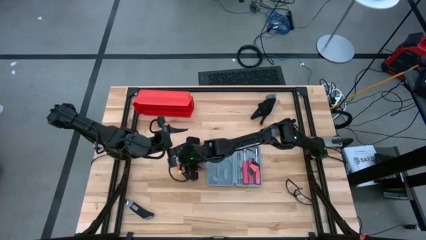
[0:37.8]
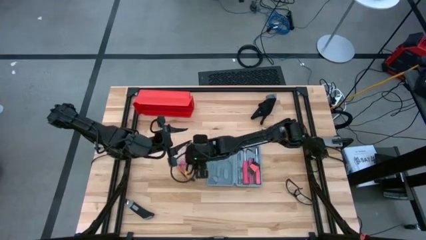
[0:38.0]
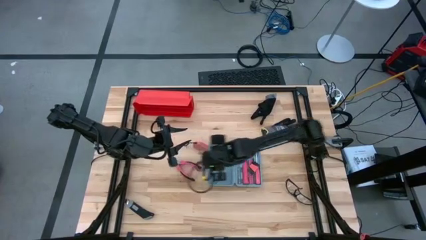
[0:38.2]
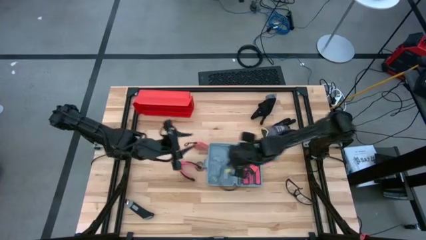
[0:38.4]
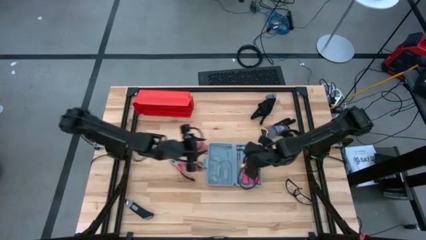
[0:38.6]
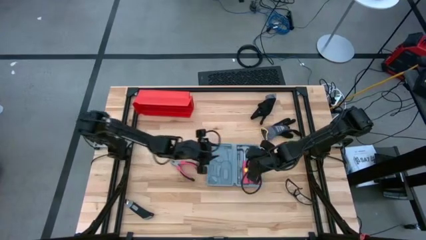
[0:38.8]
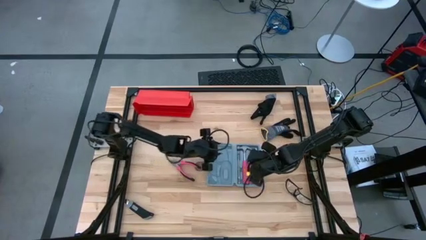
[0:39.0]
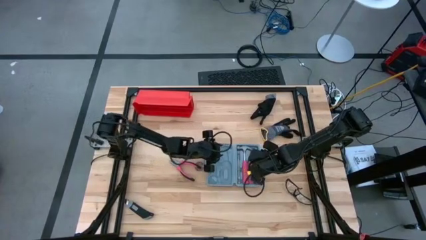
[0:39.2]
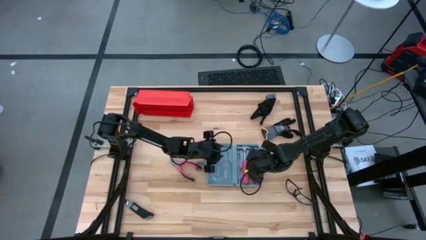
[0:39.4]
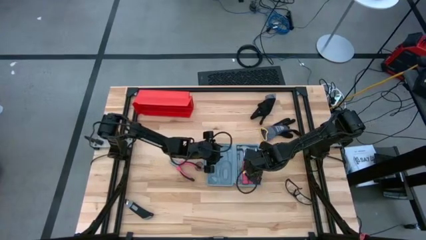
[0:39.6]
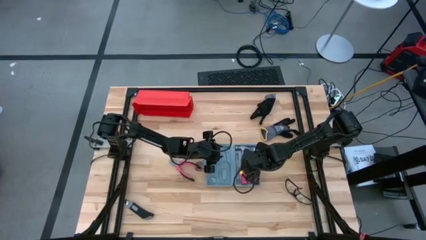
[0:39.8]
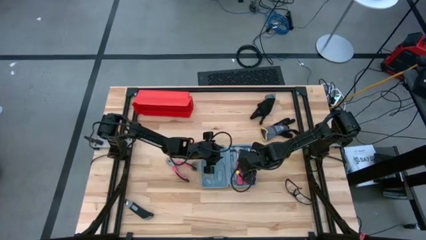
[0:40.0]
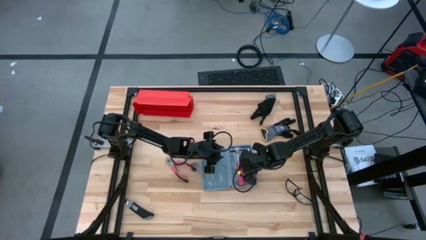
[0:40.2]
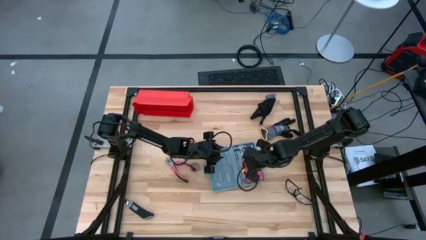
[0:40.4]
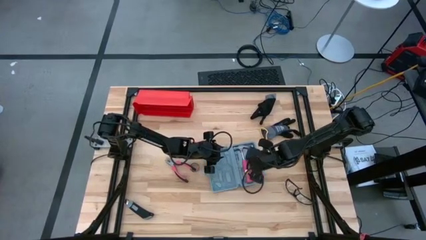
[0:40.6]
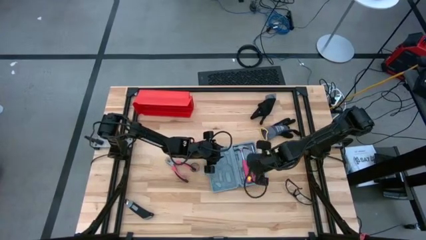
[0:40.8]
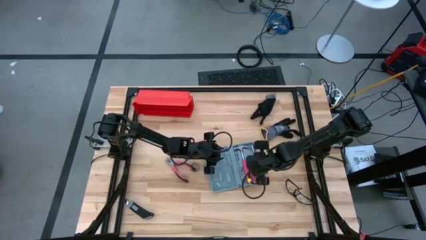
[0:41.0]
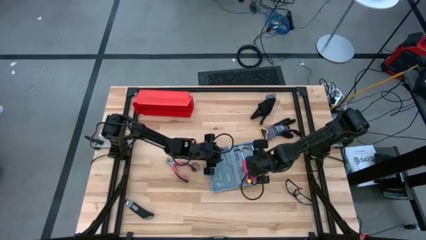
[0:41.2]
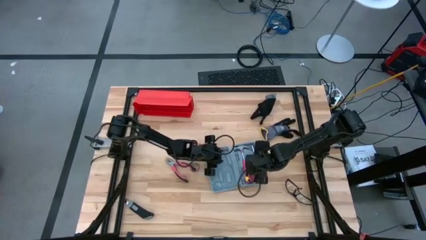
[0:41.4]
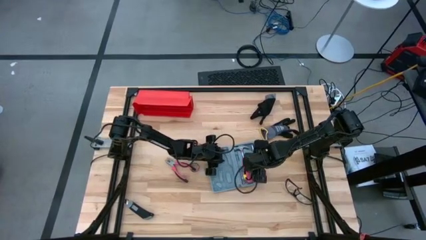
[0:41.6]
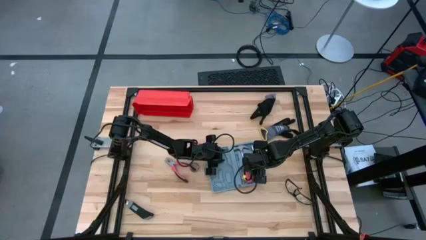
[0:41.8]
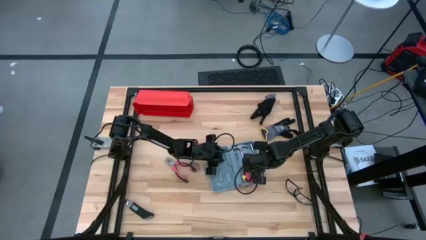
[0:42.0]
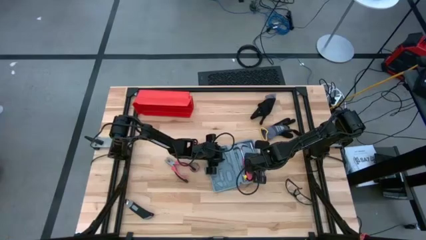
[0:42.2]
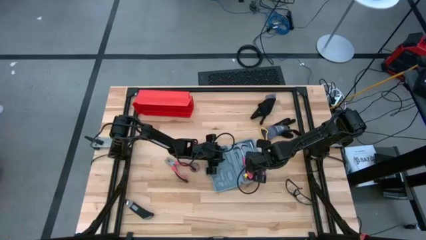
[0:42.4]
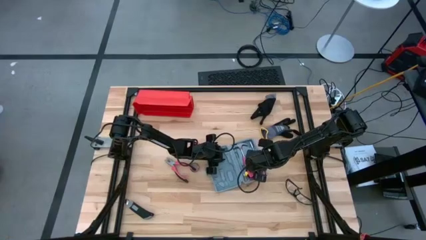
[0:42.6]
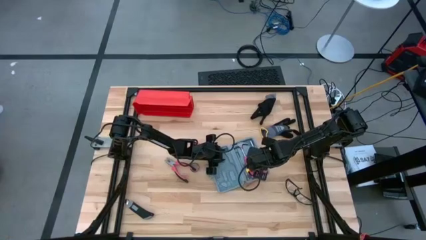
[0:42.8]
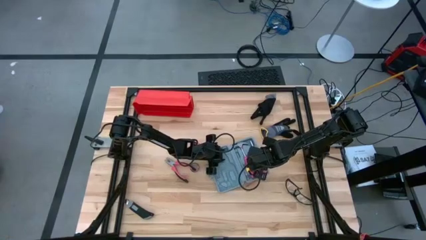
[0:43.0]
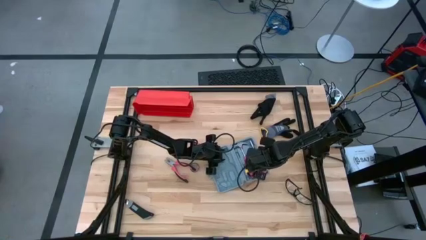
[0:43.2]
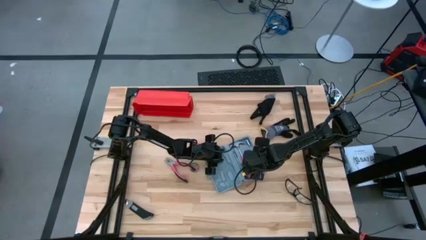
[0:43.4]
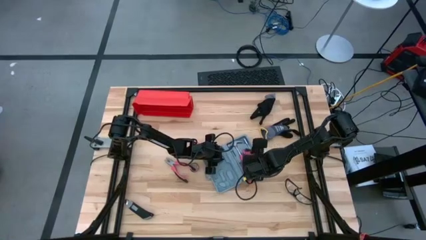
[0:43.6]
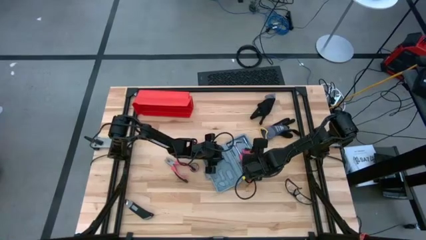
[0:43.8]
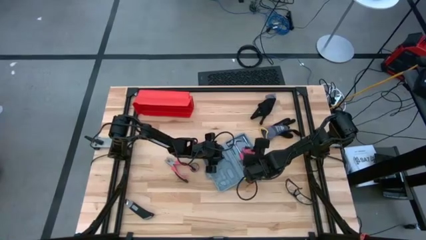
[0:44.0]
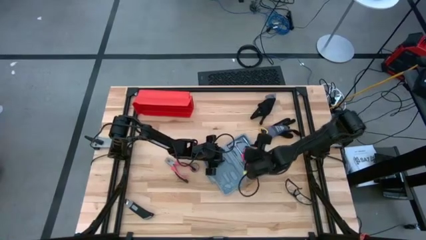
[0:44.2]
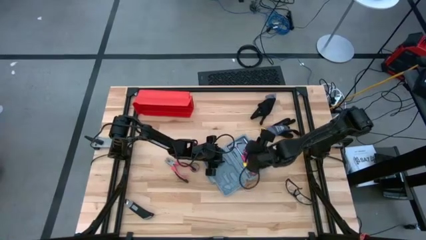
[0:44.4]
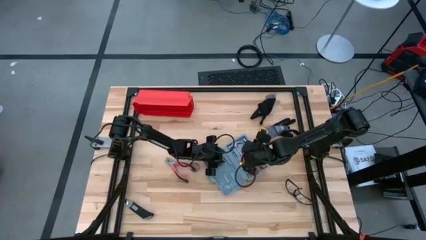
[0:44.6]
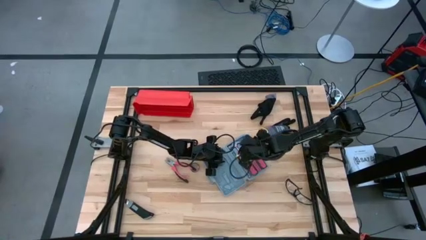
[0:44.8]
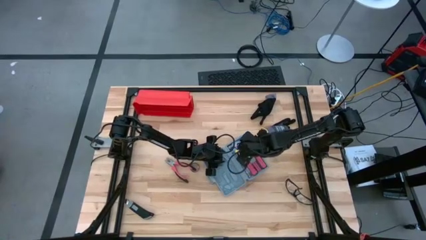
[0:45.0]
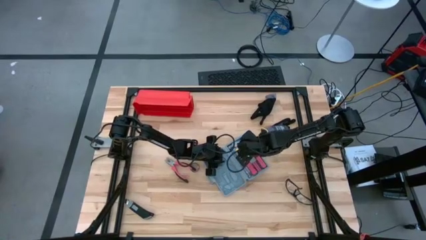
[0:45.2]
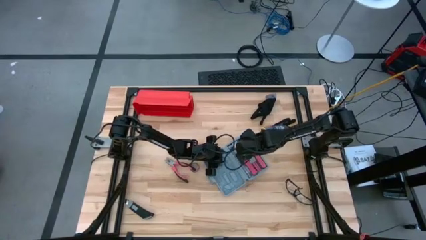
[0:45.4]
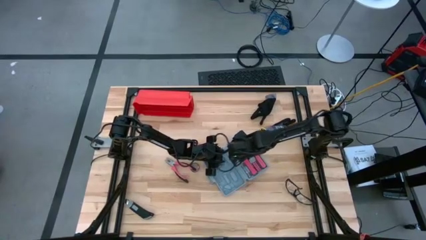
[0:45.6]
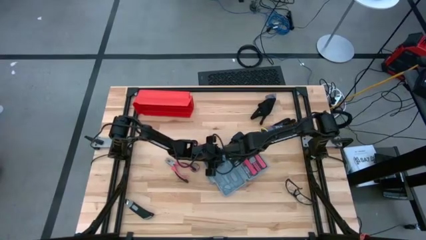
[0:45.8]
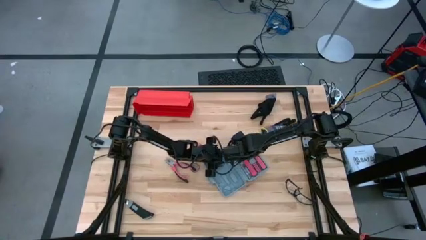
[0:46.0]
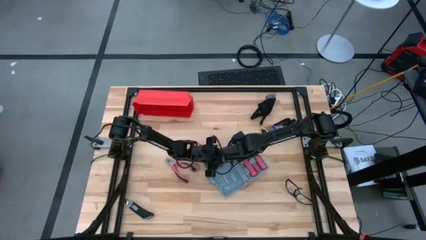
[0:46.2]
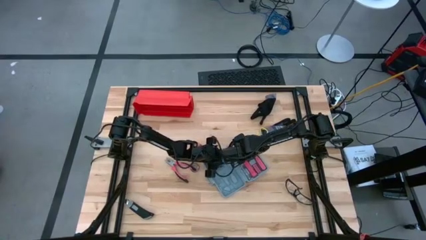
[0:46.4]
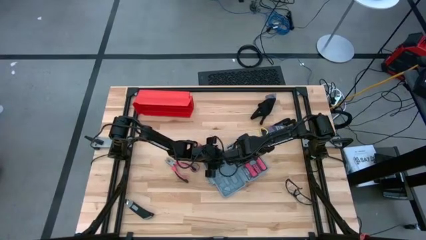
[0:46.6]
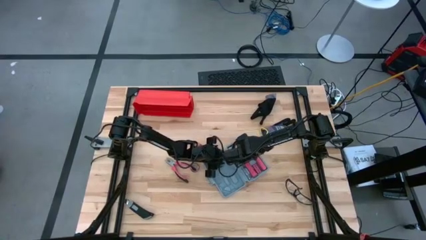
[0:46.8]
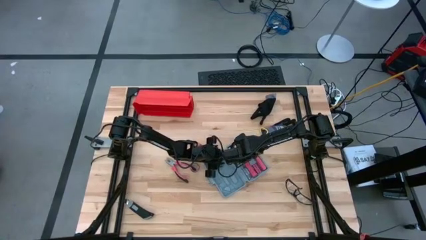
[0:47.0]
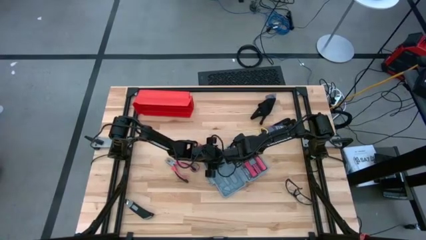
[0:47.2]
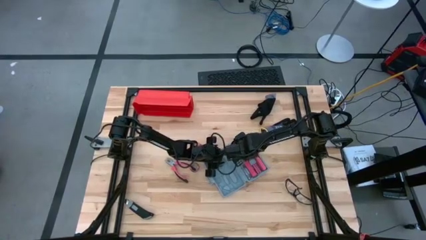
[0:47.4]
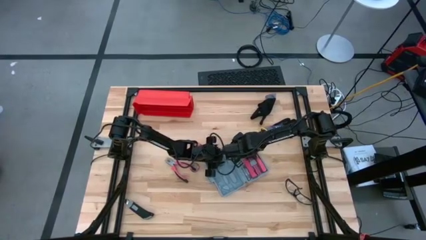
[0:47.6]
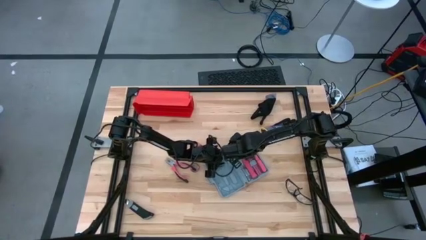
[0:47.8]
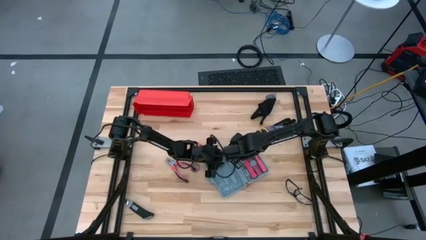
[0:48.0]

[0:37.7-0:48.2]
Task: prefit tool cases
Remove the orange hex key set from the gray pre-fit tool case

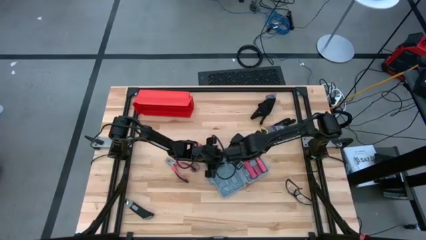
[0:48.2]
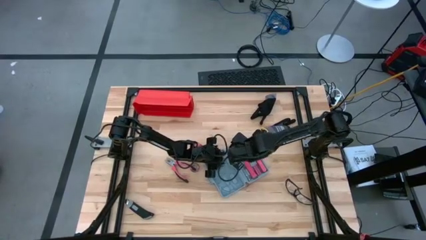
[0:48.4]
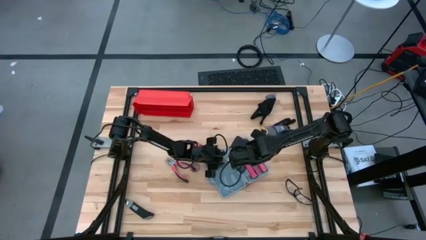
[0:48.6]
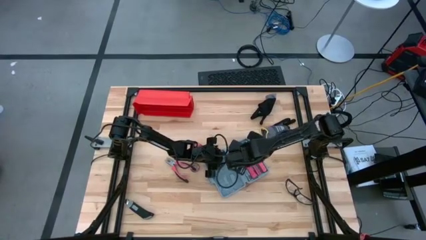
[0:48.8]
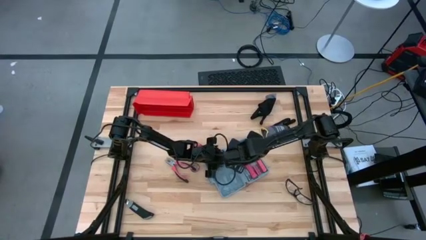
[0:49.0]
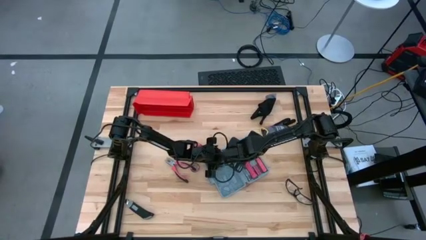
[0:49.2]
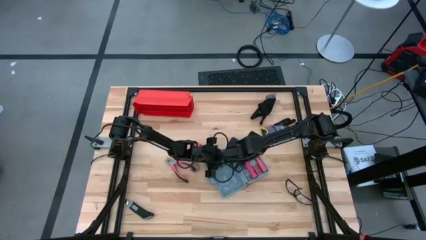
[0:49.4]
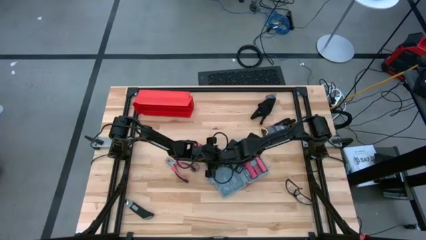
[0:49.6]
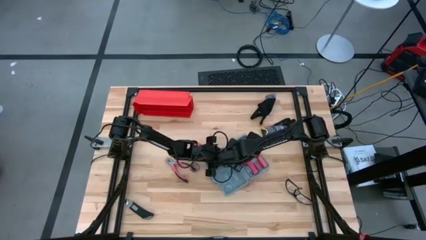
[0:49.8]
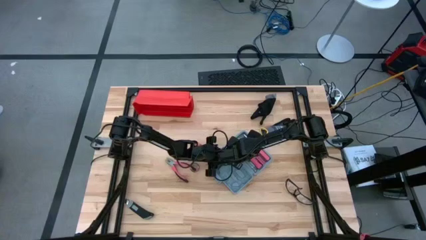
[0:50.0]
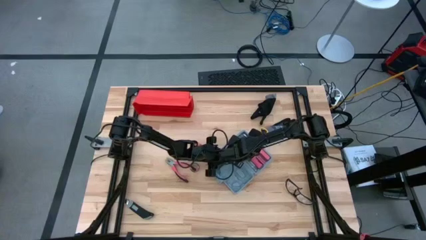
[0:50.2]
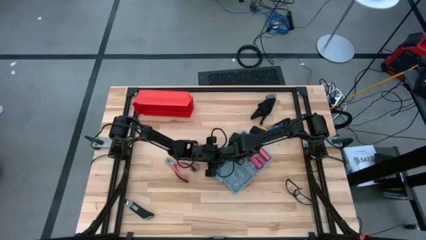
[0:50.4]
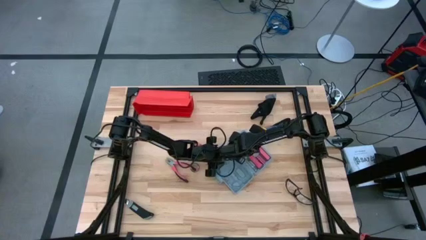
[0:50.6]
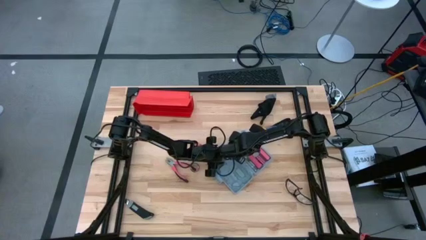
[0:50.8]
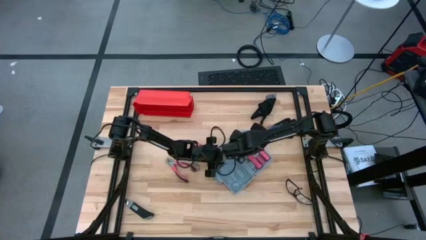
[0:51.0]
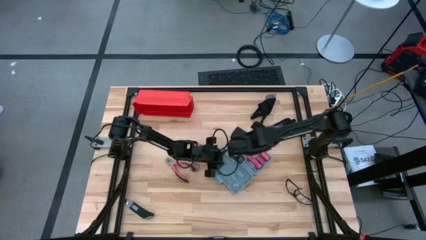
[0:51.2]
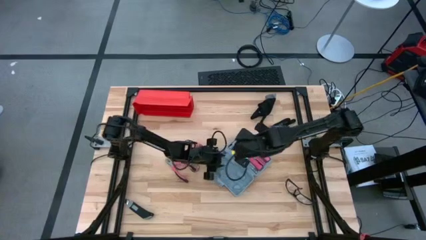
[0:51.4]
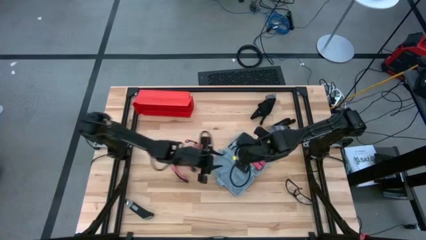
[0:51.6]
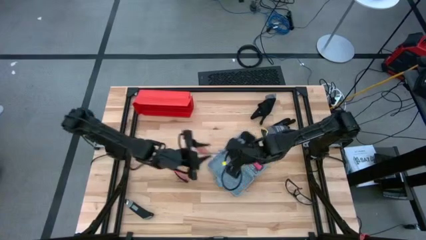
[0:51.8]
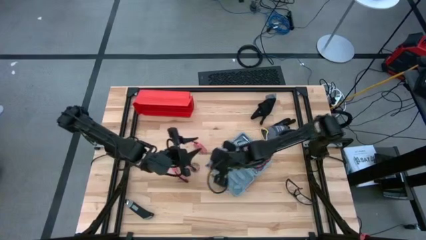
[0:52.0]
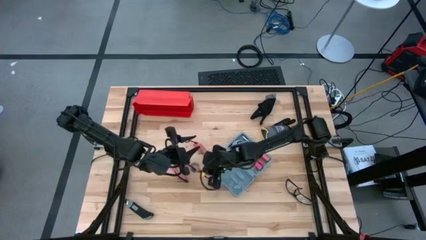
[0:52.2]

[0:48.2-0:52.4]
Remove the orange hex key set from the gray pre-fit tool case

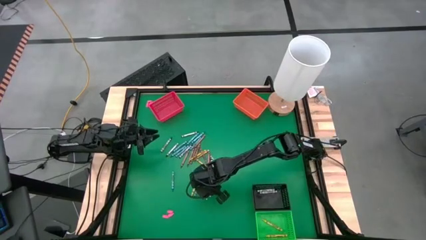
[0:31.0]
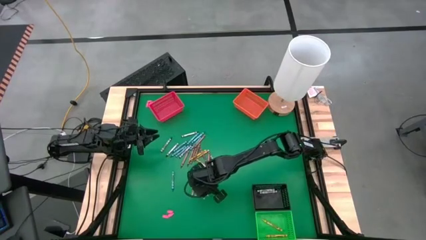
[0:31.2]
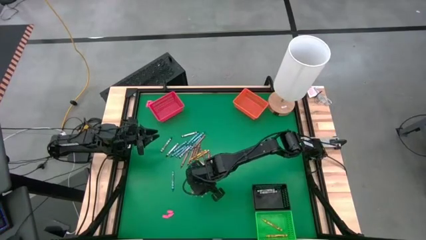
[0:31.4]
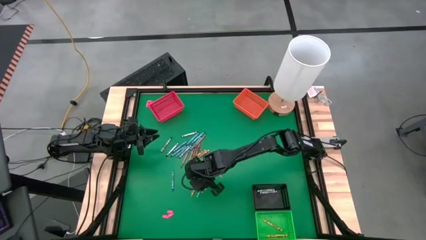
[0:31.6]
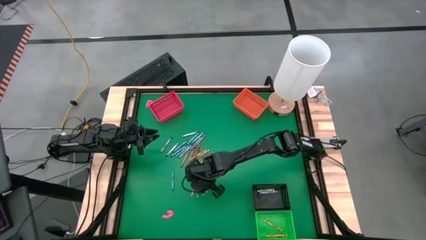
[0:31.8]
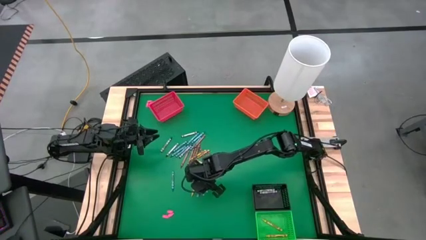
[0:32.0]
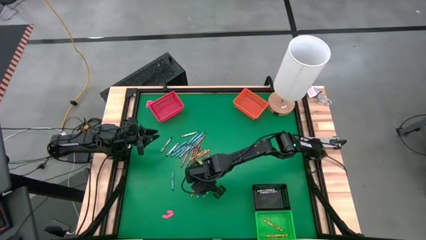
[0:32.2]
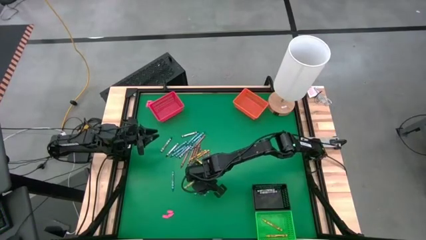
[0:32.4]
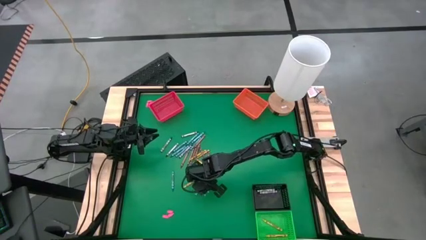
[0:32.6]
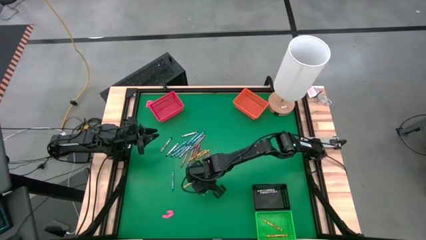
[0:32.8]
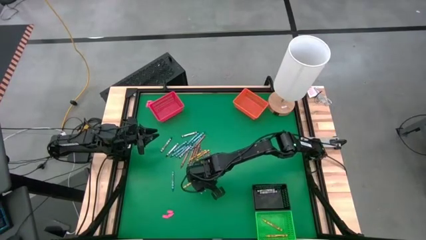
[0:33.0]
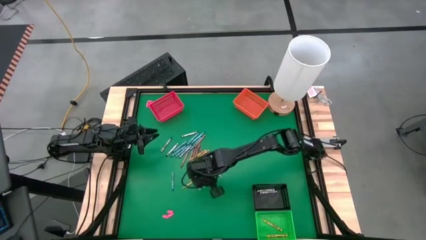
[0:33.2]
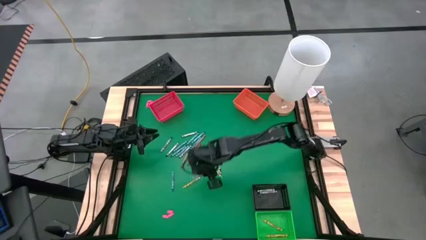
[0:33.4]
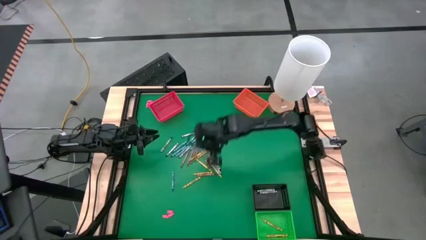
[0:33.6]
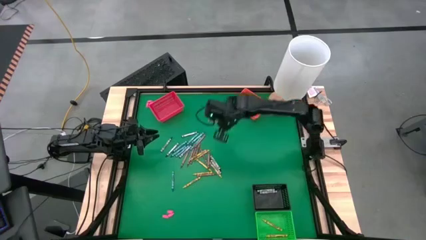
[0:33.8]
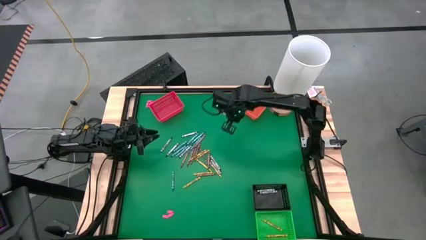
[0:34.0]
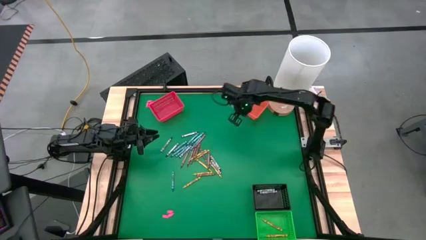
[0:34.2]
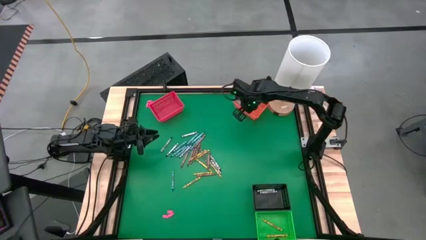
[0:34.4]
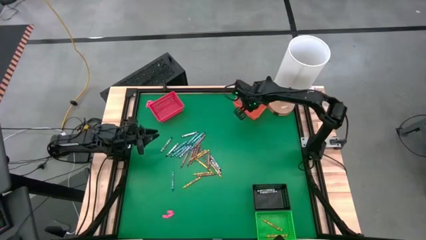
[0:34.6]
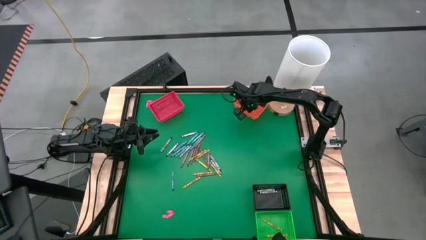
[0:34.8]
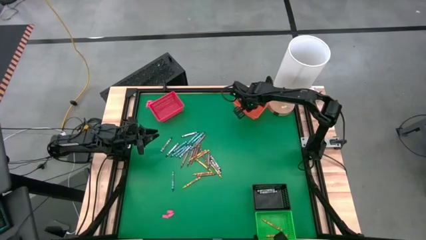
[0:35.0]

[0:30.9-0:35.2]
Task: Sort crayons
Put the blue crayon into the orange bin
